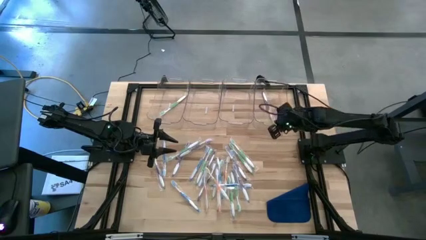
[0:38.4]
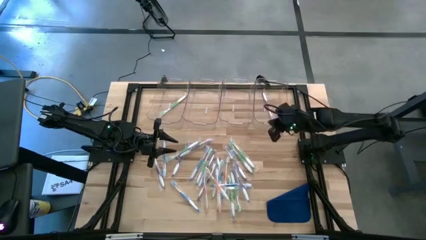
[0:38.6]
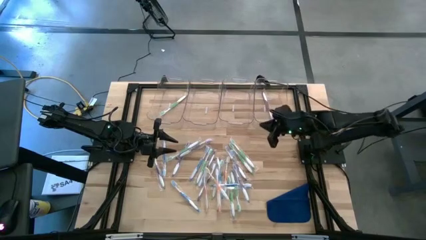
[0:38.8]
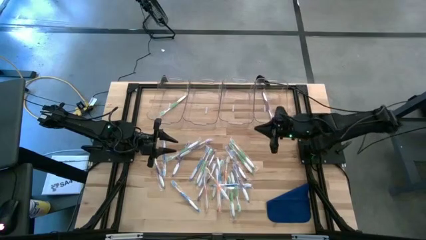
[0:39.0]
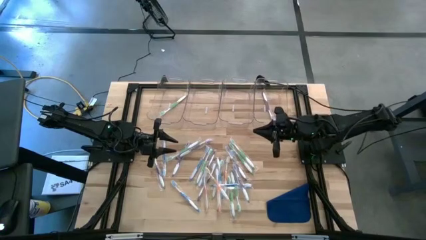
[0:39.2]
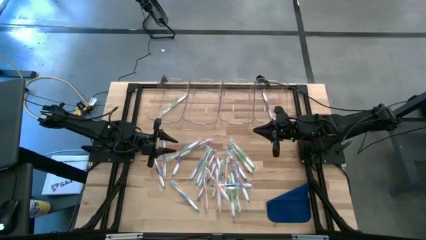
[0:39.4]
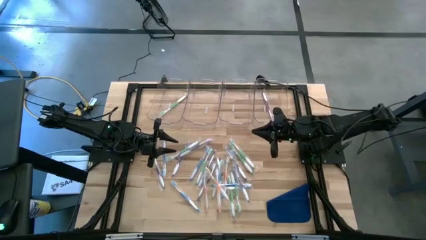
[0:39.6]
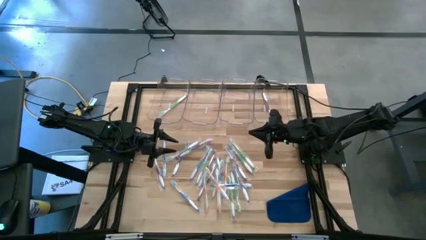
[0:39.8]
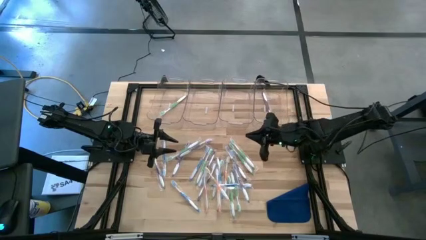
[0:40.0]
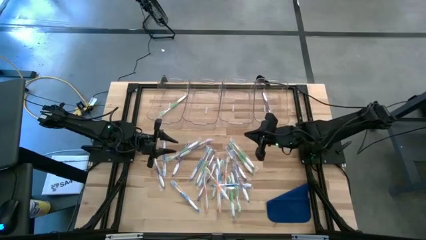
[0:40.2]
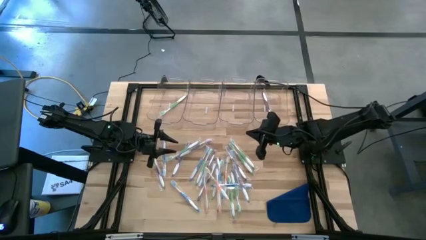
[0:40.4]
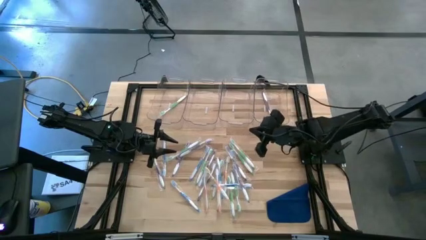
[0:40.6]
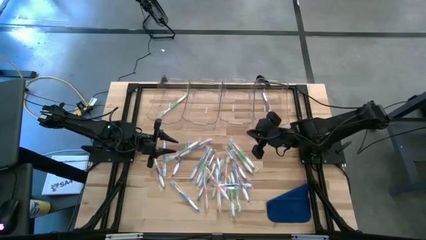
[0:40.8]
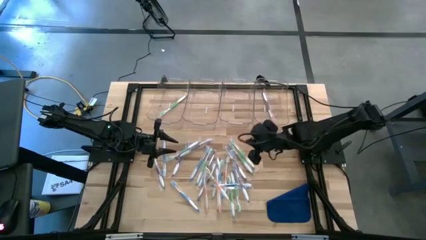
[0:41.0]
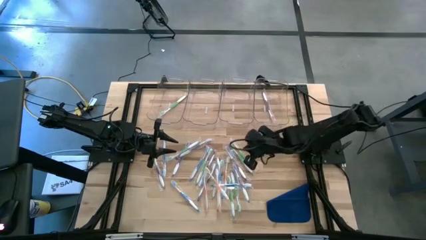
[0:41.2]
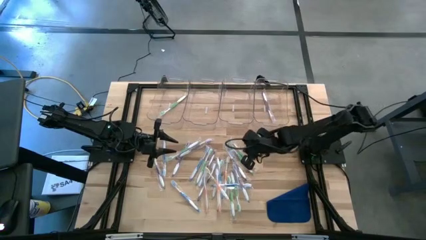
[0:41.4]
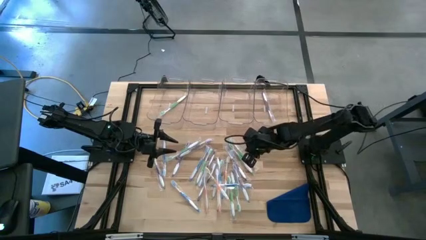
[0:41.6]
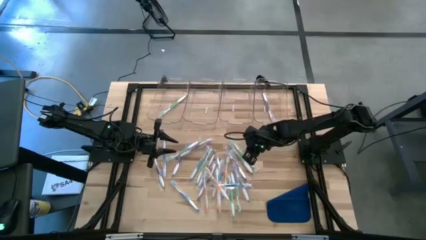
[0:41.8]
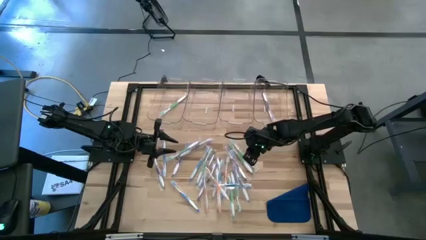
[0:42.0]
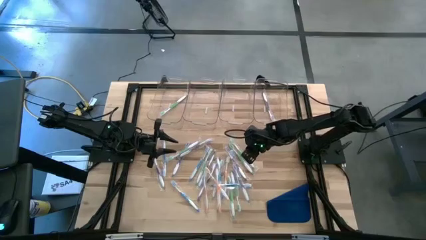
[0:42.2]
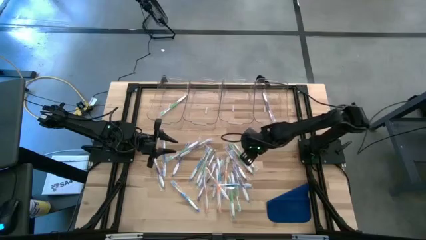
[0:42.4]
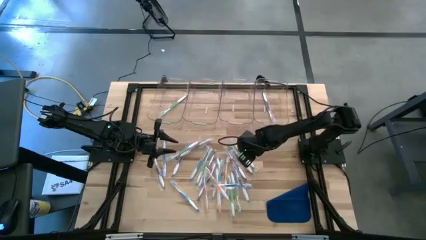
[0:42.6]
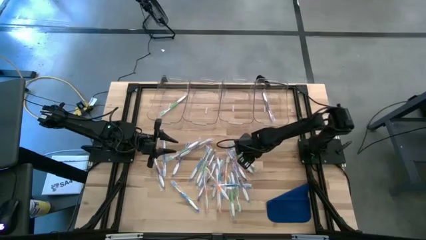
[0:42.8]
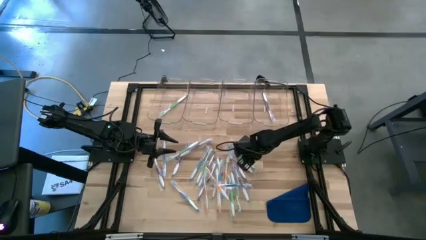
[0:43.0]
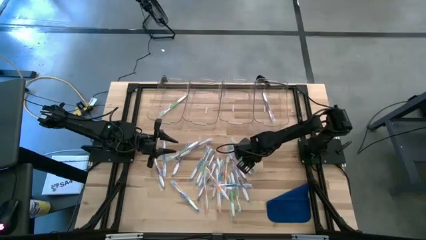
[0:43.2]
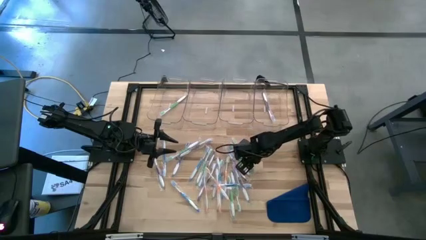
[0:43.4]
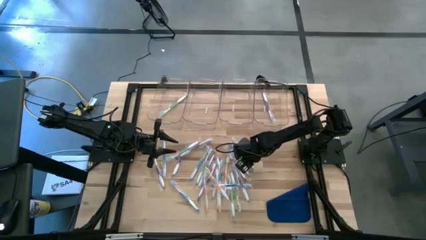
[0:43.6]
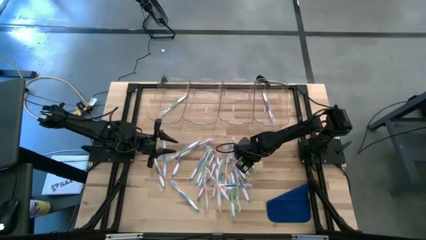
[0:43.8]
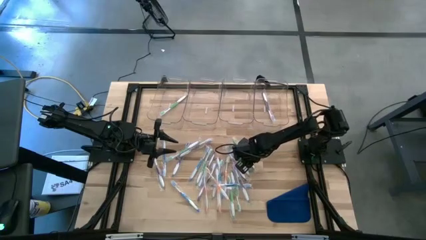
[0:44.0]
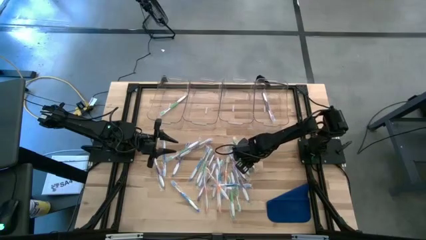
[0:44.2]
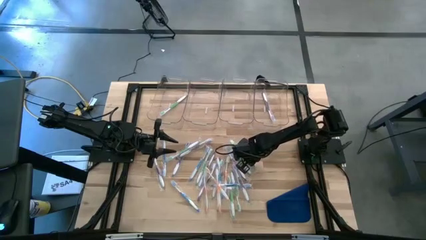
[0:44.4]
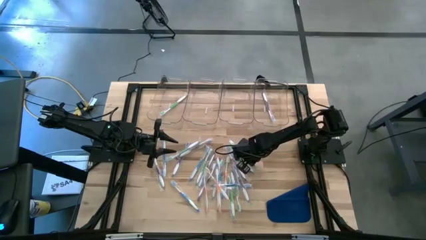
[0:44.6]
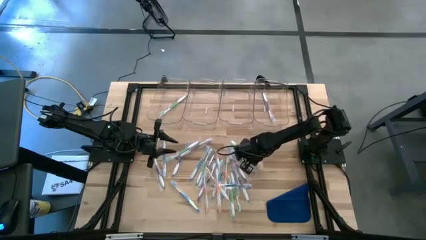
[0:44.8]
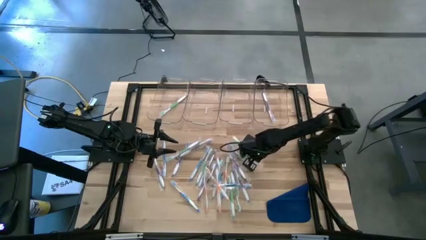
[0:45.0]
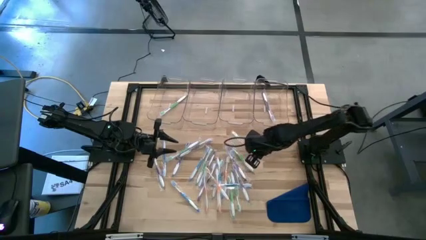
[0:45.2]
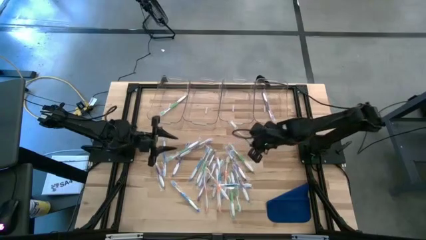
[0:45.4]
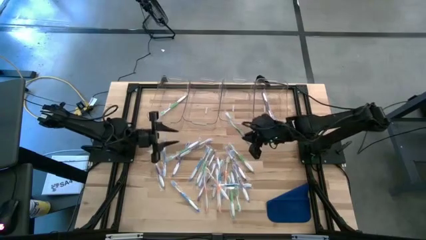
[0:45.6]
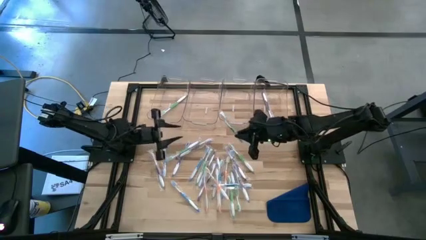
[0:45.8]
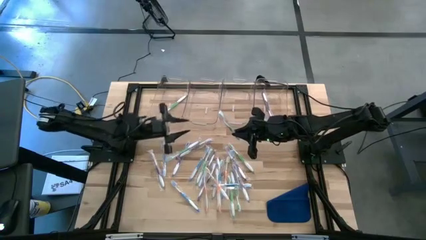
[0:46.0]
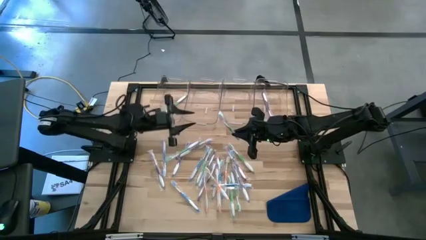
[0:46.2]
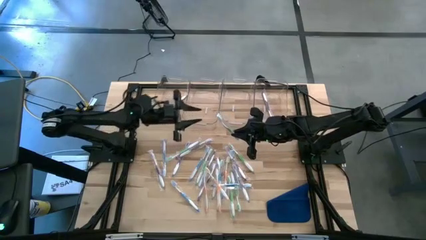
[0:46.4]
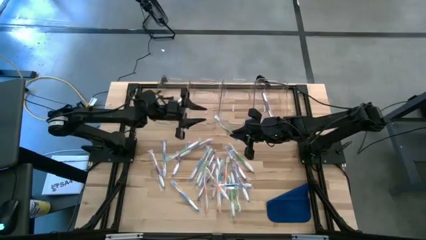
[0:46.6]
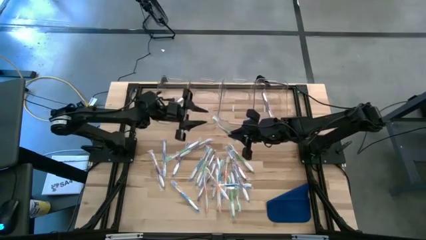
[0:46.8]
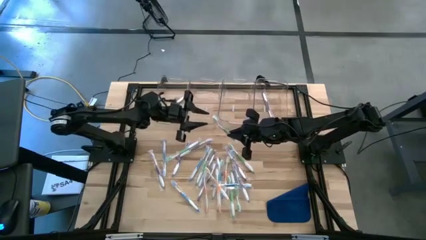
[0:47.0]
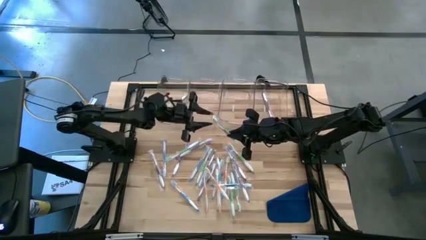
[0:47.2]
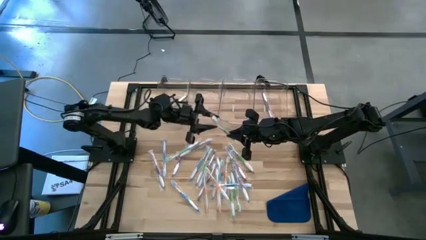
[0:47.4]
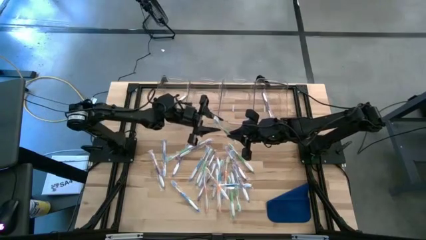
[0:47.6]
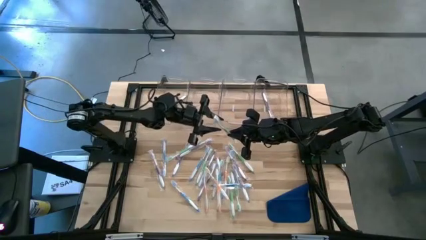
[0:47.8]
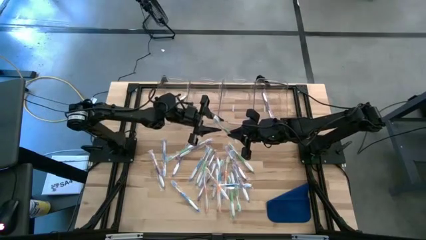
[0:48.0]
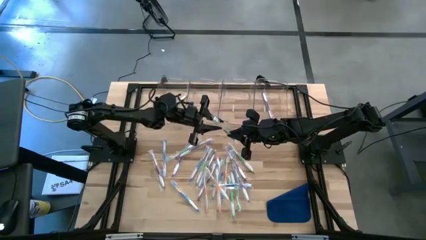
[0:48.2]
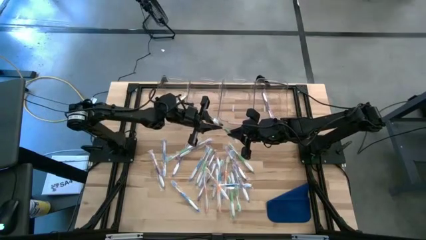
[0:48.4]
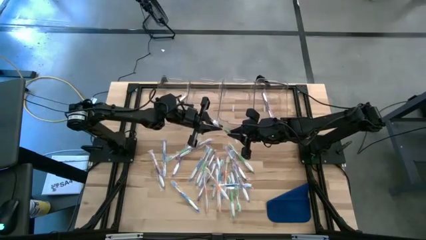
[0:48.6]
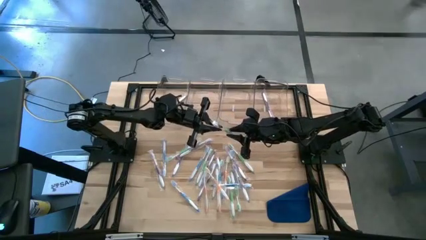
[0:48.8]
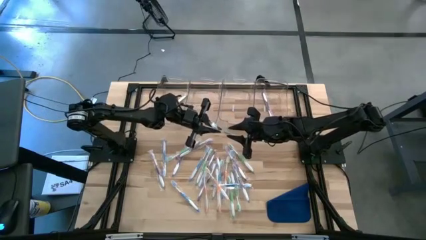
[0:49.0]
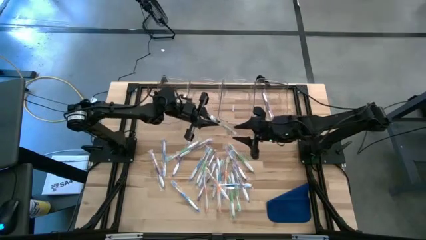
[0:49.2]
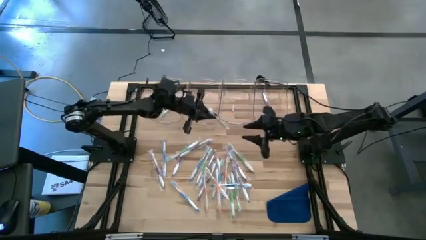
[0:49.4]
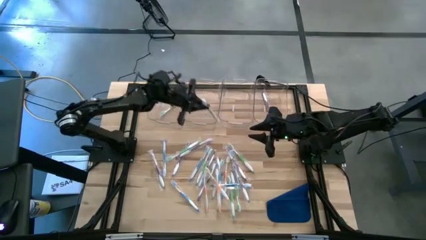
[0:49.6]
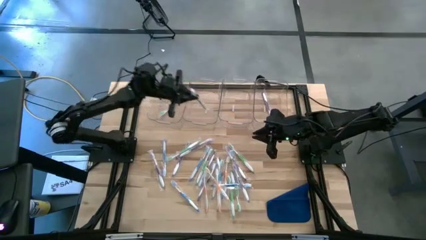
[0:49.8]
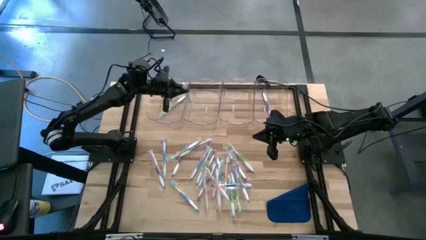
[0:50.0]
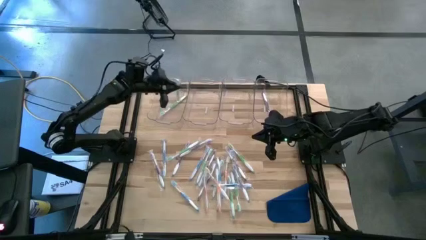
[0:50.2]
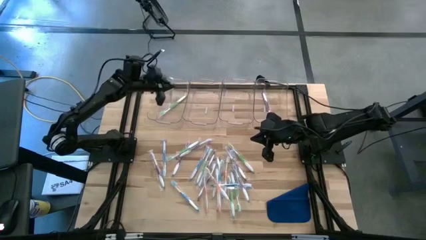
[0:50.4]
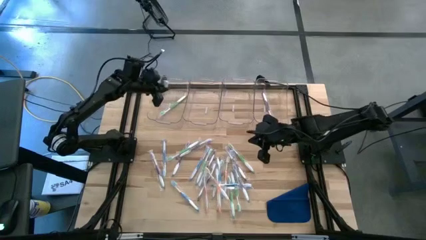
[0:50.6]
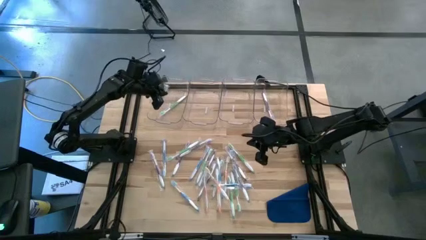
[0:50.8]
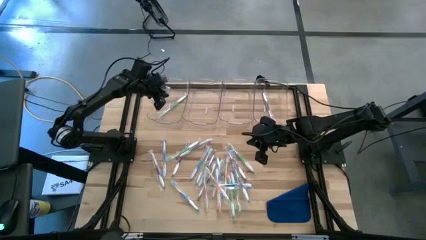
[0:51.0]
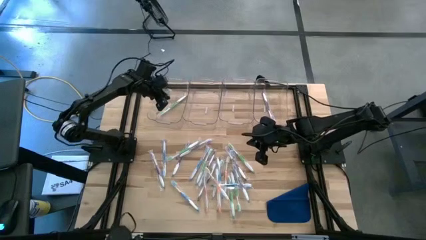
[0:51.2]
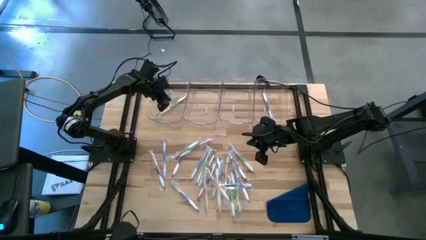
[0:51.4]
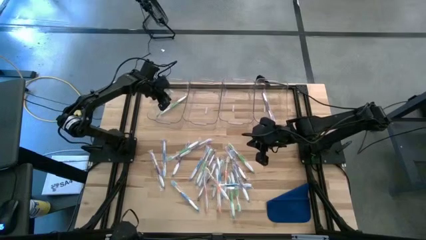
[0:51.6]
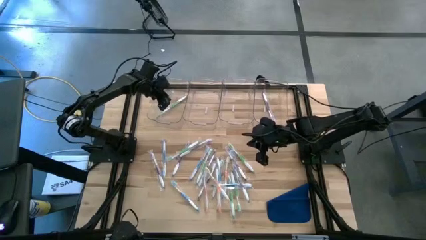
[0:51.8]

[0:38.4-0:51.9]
Task: Pick & Place Toothbrushes
Put the green toothbrush into the left transparent bin

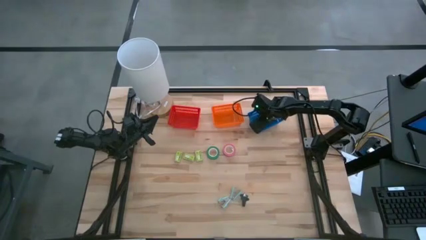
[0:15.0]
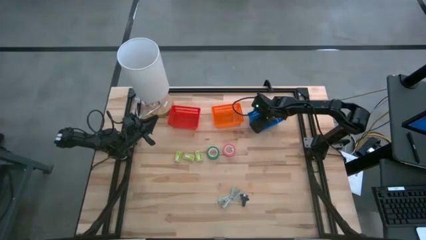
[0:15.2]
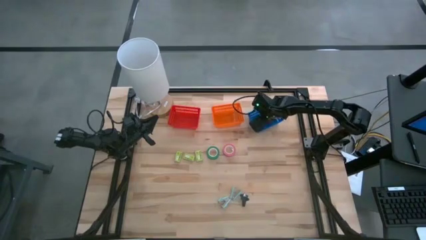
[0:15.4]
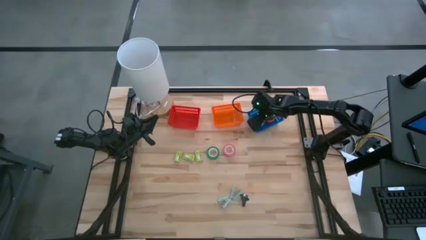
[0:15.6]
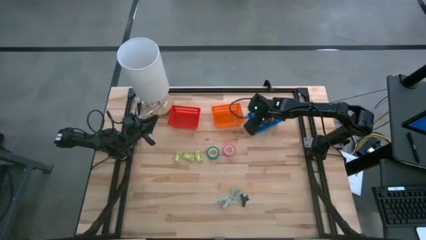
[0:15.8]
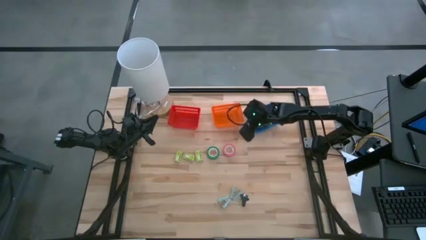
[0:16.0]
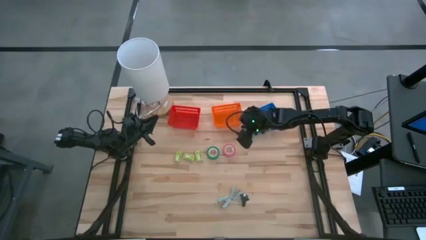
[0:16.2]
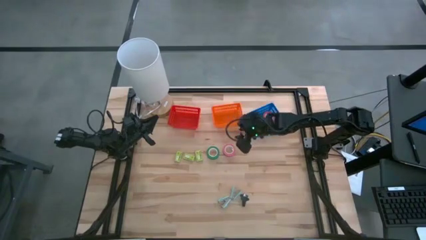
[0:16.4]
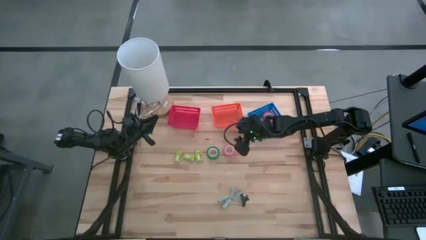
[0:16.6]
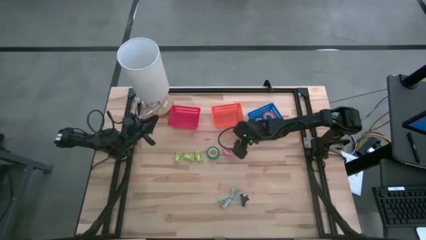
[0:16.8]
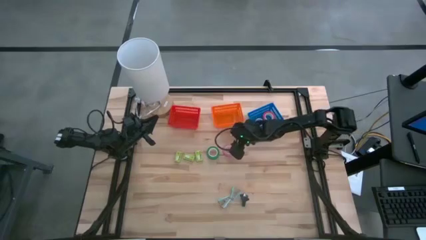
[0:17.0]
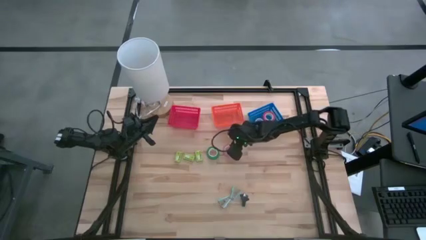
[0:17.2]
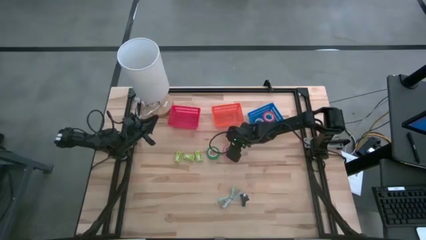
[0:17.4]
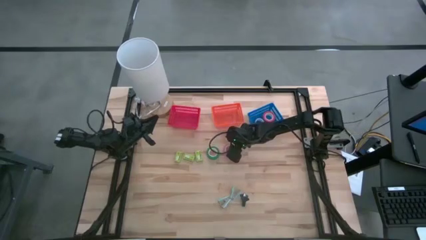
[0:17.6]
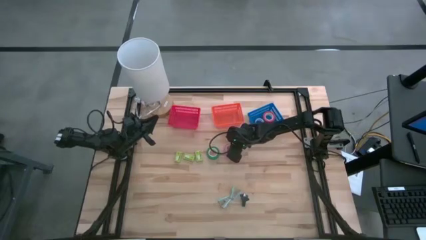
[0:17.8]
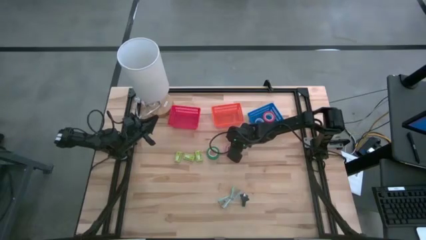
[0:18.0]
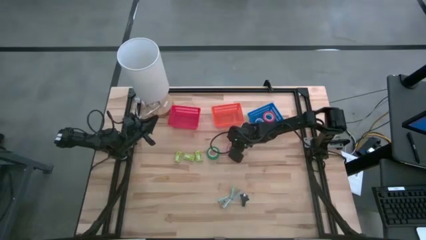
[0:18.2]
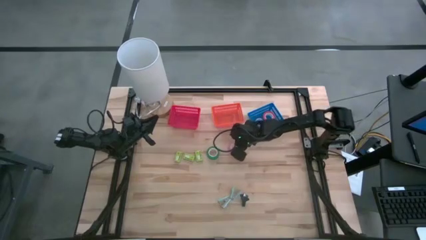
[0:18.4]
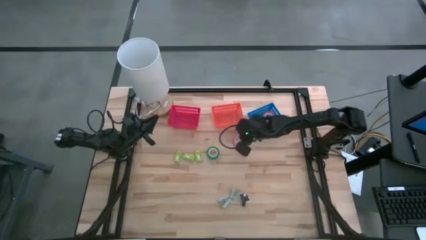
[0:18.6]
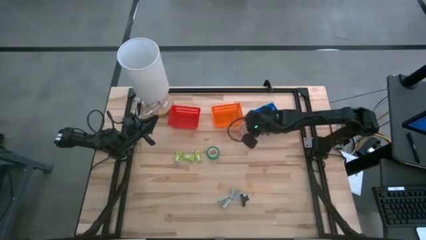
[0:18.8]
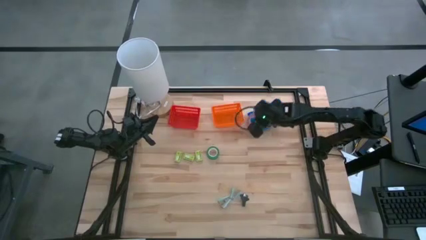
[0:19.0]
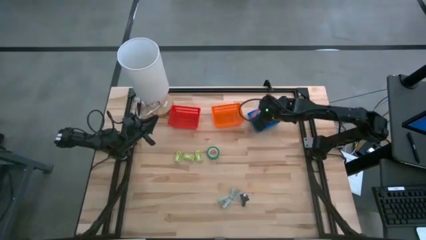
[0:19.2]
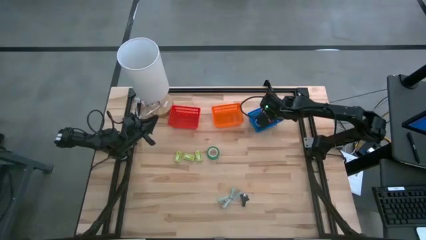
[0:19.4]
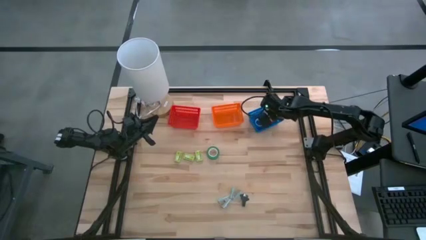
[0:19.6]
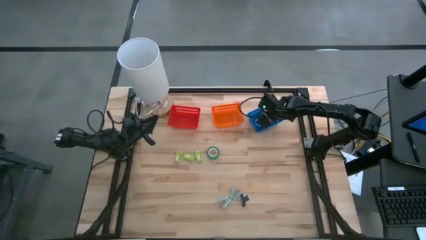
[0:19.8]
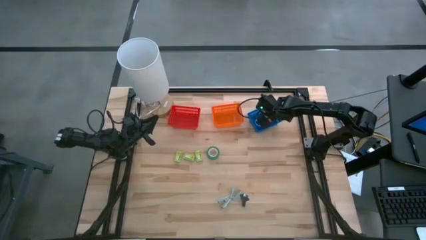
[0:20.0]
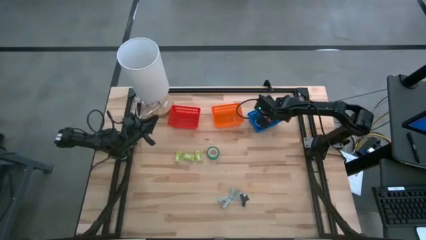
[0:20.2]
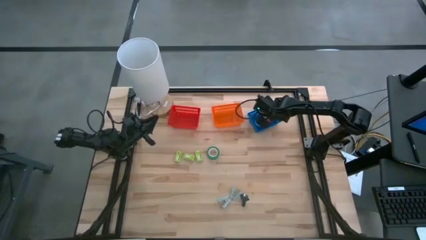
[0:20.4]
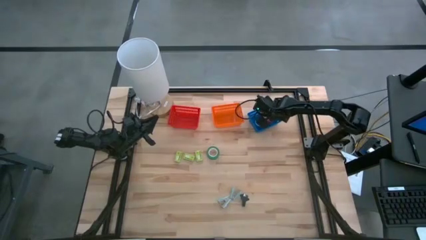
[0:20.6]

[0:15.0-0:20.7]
Task: Pick and place Stapler, Stapler remover, tape
Put the pink tape on the shelf
